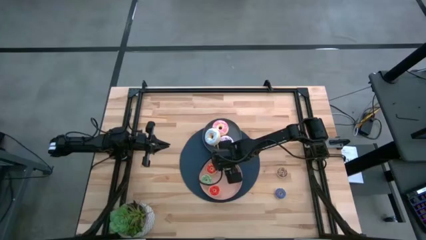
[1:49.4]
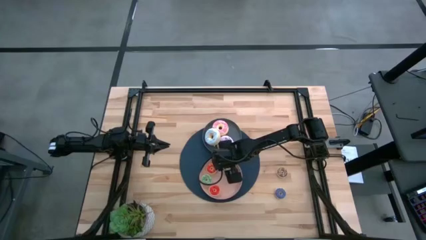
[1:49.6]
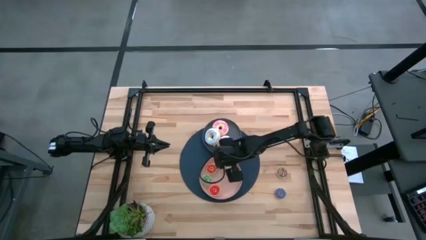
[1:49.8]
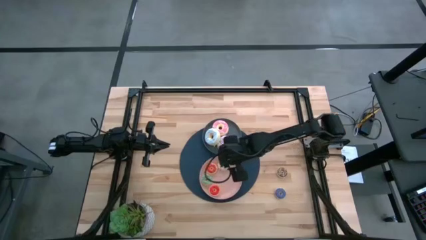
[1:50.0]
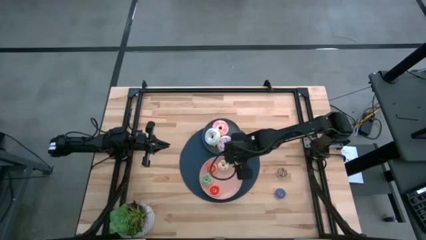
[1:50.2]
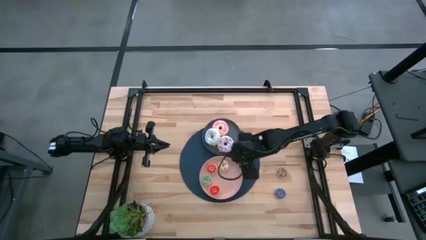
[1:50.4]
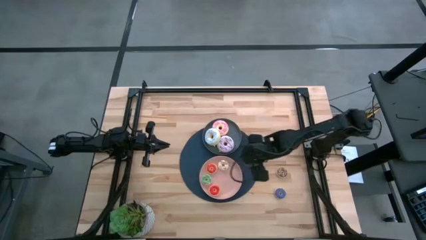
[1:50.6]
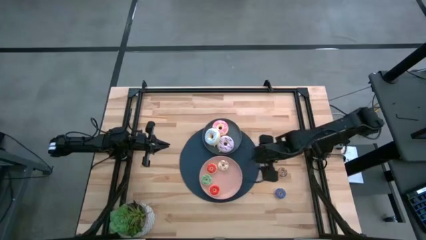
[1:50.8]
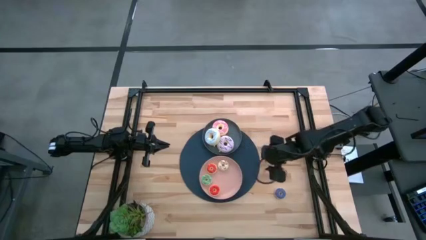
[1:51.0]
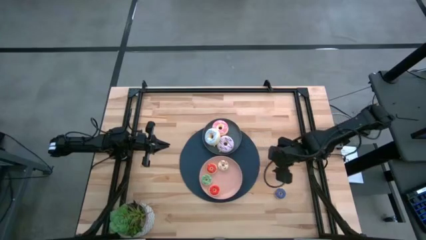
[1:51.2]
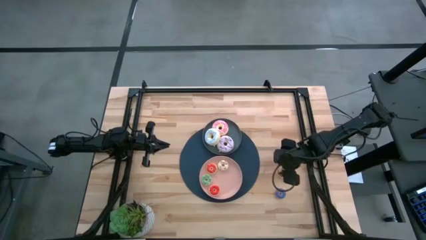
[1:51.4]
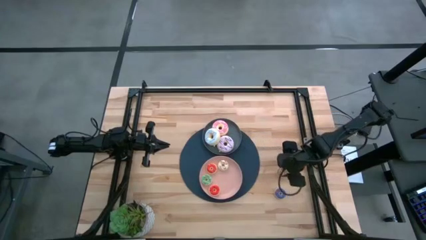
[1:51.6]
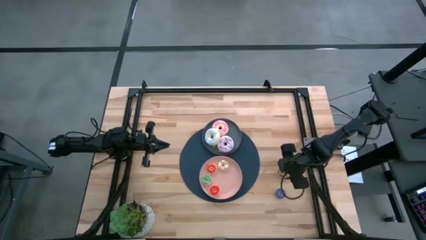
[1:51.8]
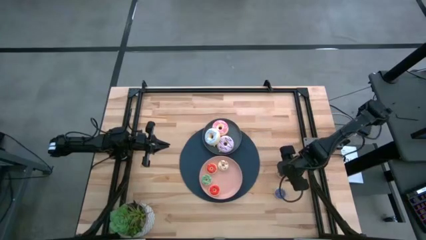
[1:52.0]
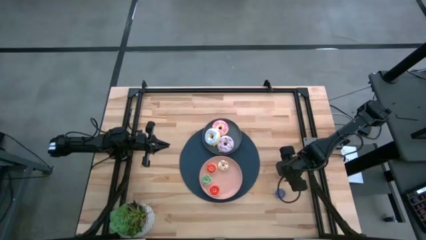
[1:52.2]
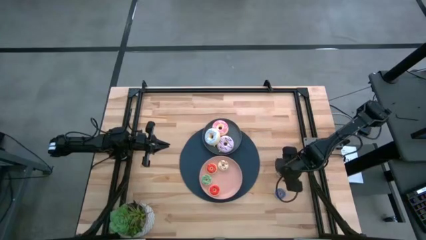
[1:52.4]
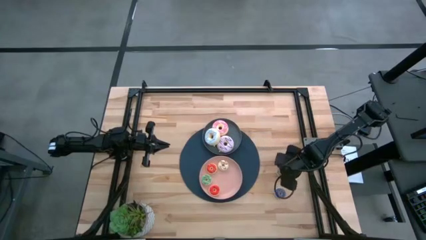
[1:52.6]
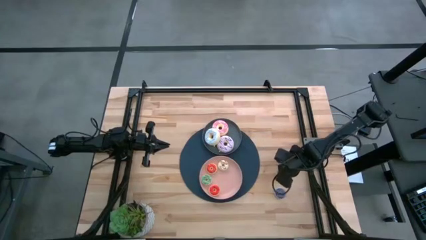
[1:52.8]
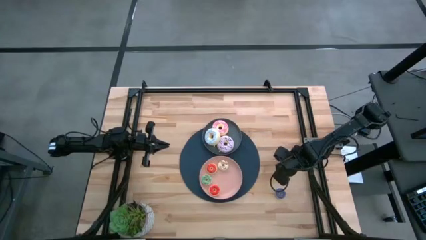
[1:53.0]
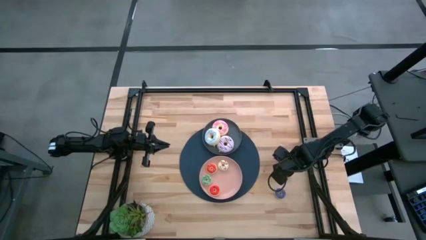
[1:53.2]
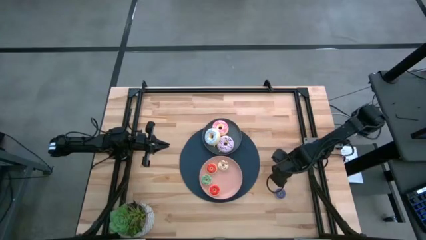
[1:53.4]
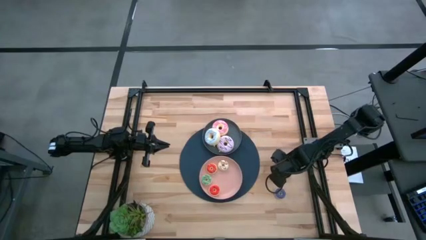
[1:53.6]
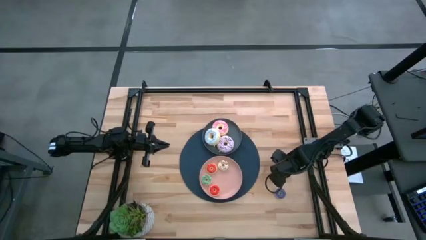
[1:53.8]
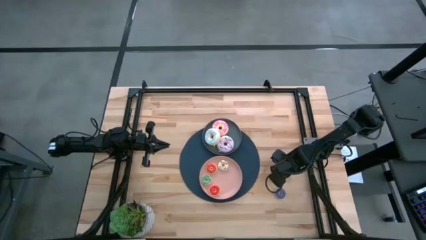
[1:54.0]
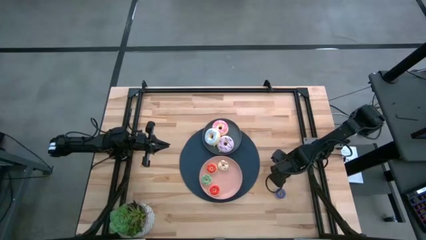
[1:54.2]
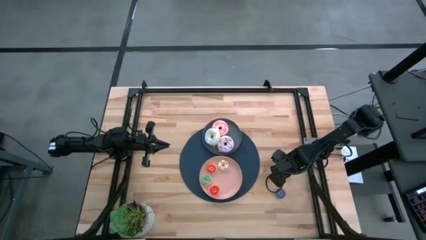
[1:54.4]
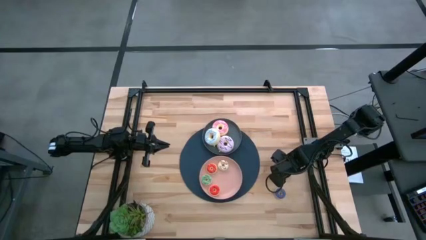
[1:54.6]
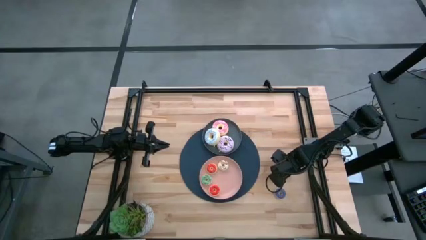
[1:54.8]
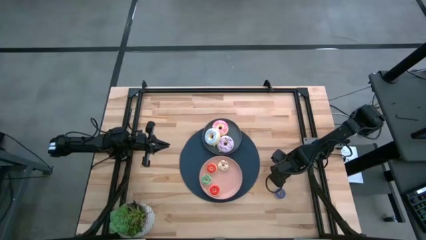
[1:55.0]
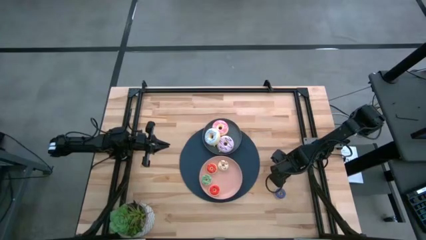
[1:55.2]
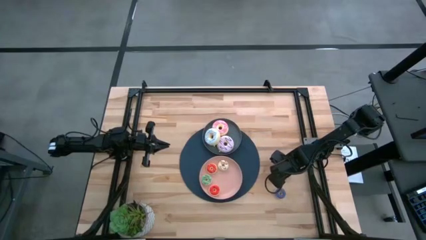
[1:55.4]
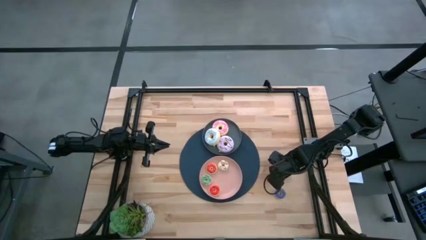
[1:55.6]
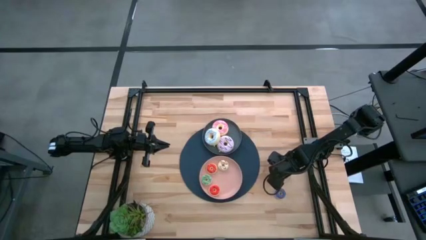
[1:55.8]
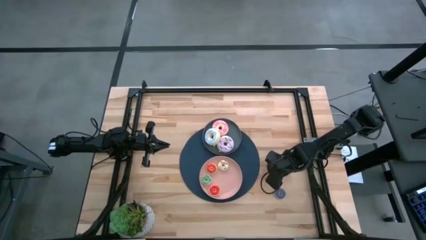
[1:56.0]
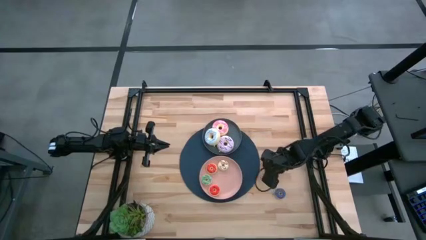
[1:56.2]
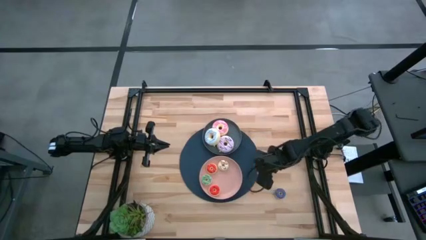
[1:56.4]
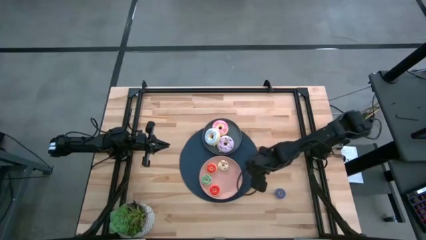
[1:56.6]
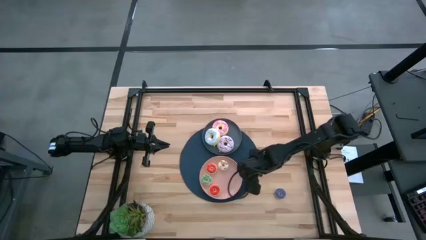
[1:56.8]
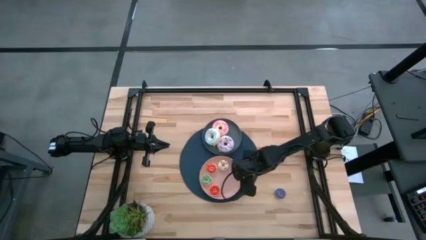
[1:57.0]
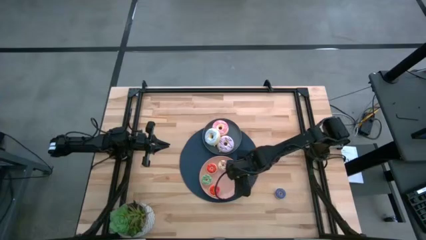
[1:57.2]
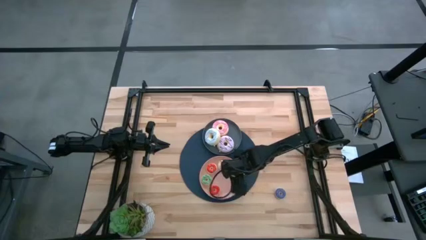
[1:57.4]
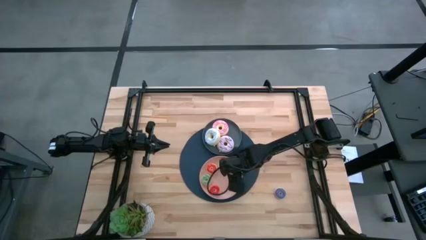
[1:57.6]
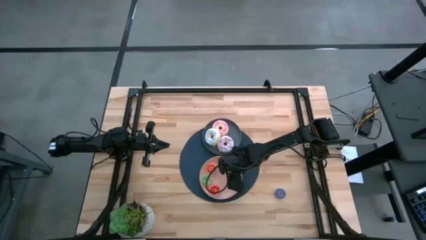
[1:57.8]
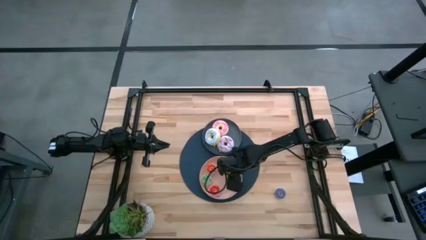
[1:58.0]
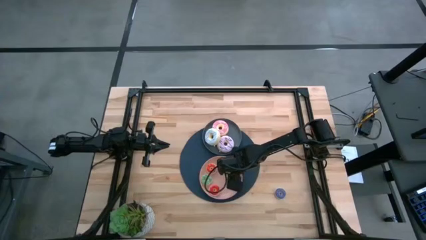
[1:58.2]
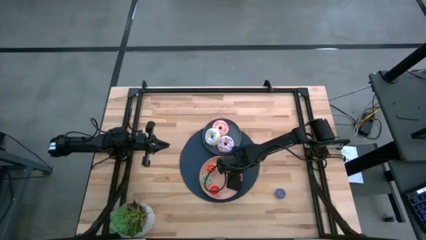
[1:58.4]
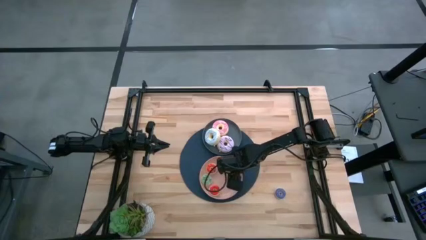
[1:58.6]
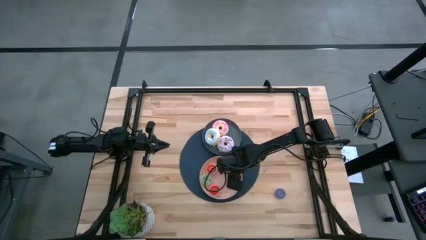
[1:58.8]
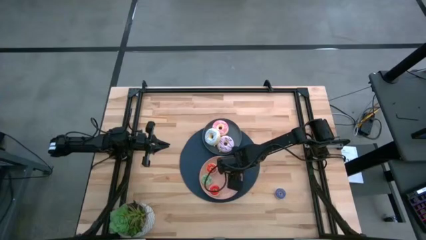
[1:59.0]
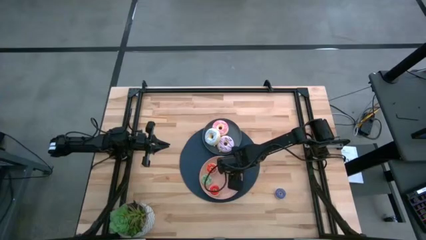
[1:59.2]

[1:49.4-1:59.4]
Task: Pick & Place donuts
Put the small brown doughnut into the pink plate

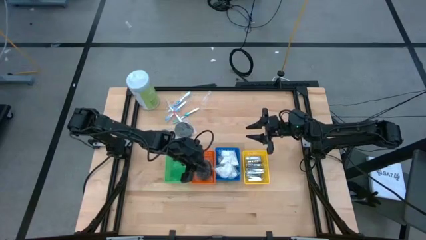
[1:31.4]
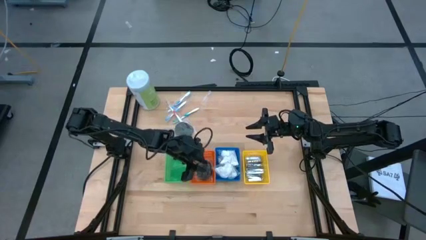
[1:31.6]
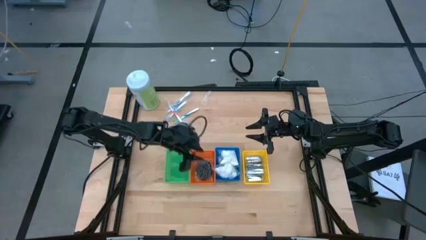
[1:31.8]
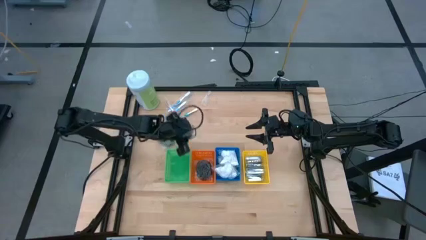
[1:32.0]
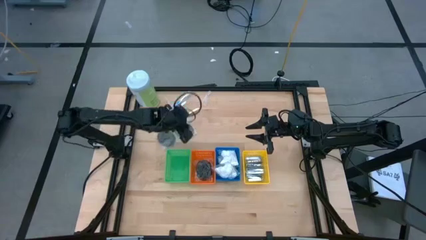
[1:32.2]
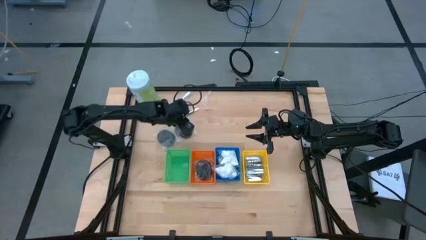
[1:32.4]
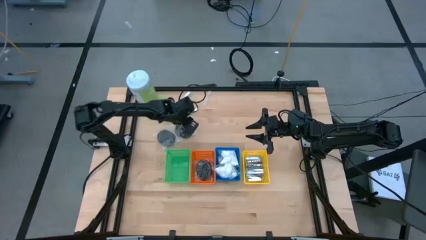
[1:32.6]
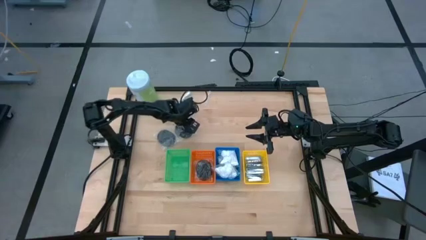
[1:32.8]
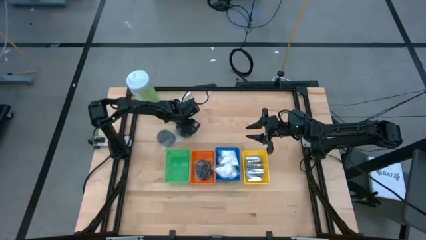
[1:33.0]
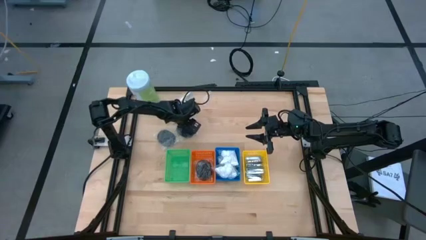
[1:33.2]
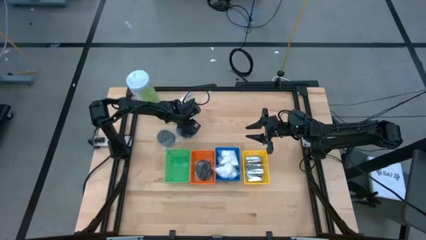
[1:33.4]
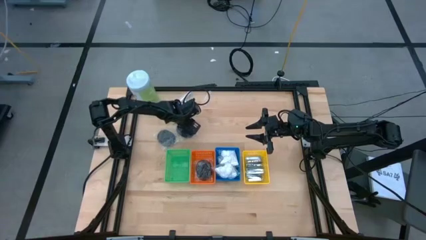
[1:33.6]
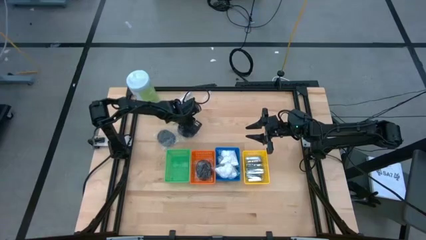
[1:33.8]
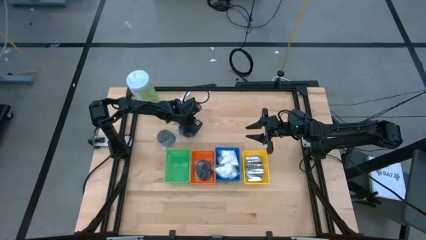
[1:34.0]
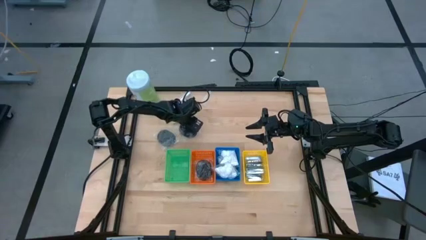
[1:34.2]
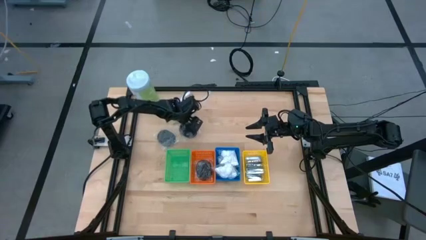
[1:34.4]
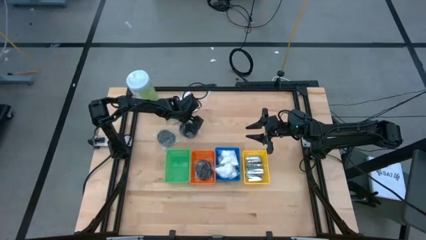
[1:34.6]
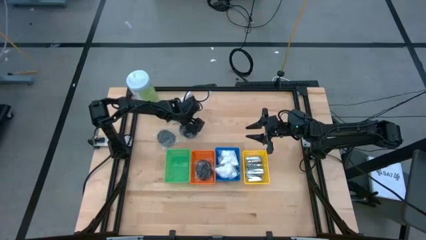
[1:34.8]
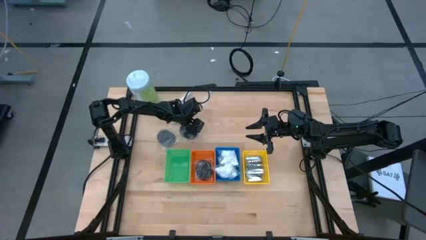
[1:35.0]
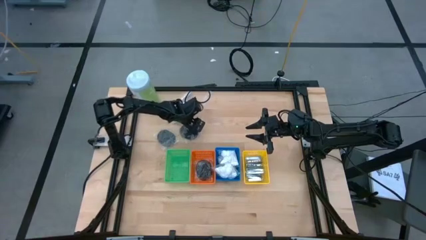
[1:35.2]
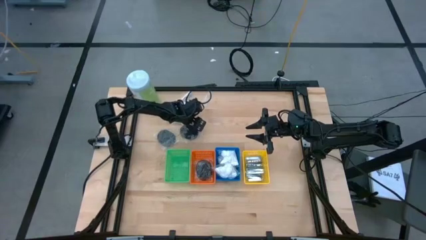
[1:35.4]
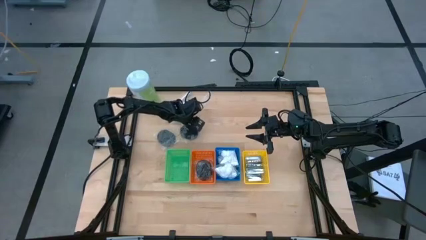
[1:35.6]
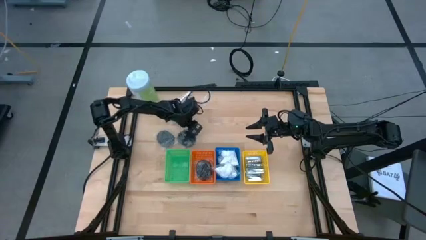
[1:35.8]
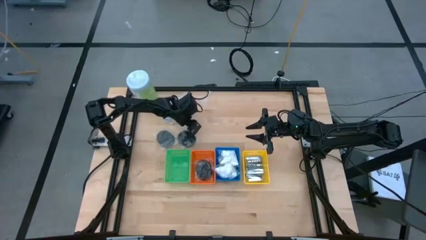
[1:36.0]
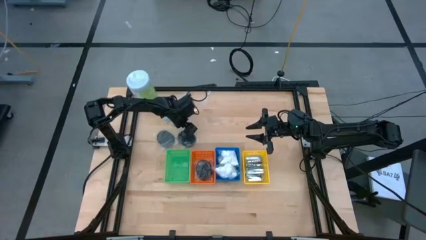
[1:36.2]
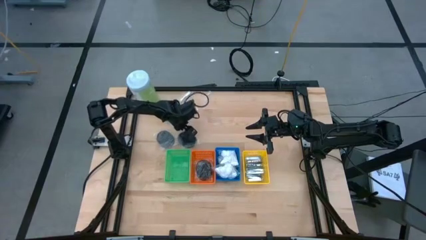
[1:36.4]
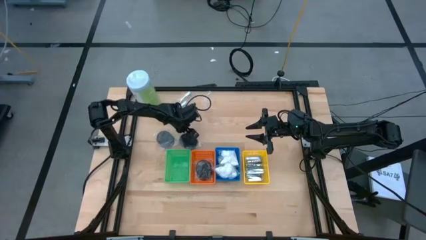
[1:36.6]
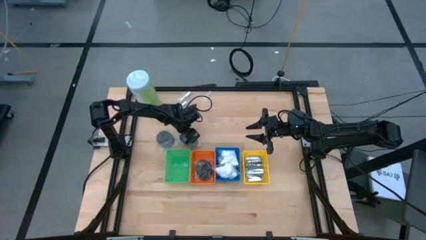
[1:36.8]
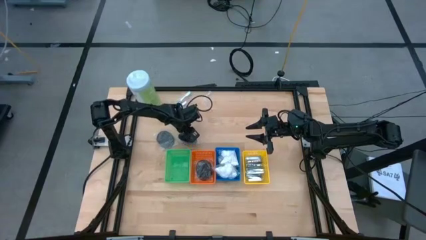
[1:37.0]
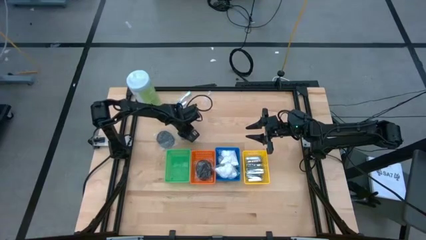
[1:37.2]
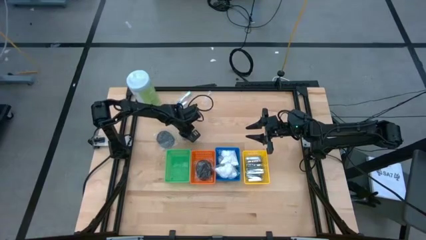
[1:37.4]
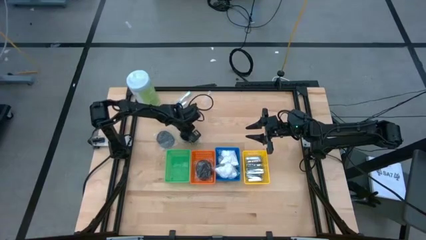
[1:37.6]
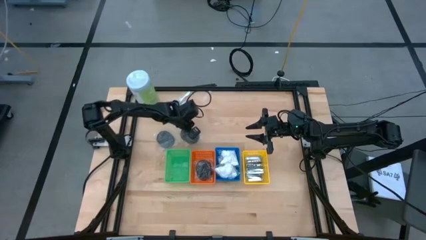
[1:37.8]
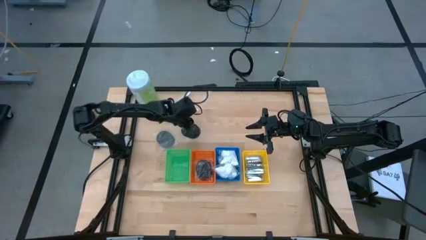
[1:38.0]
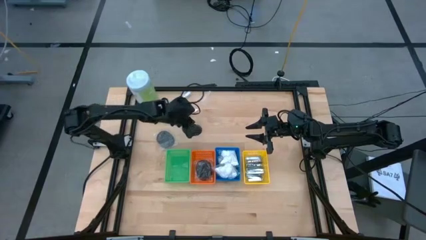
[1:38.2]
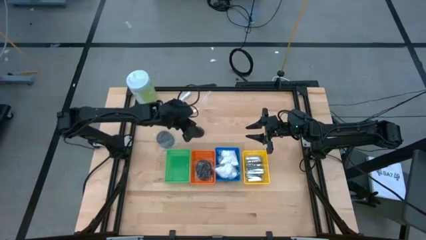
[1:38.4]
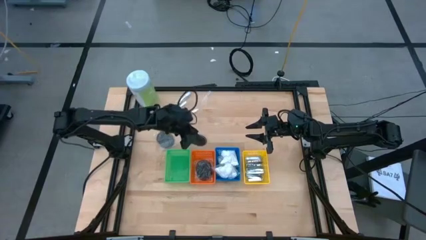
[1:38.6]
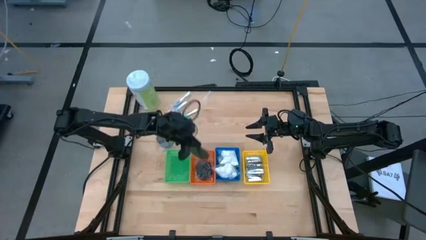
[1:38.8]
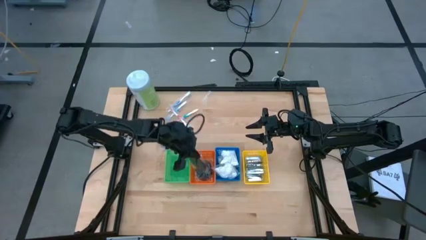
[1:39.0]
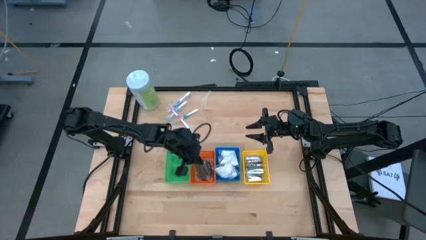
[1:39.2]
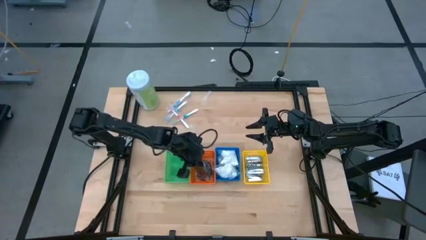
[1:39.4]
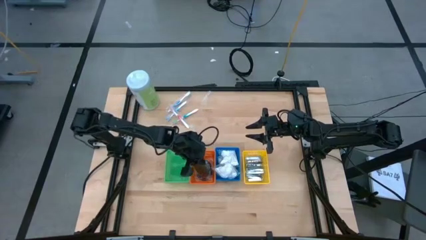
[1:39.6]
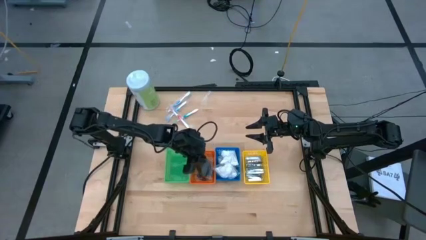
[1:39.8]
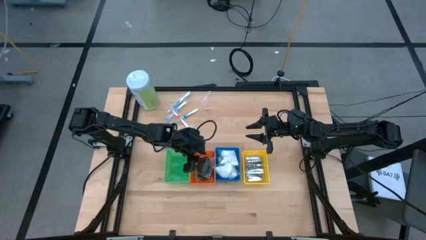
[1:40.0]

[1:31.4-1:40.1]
Task: Pick & Place Travel size toiletries
Put the black mirror into the orange basket
